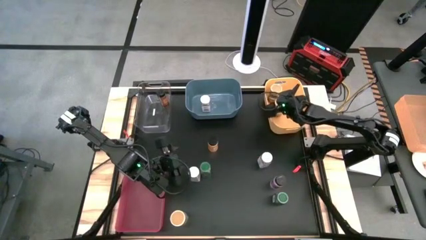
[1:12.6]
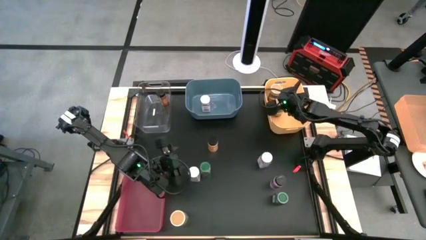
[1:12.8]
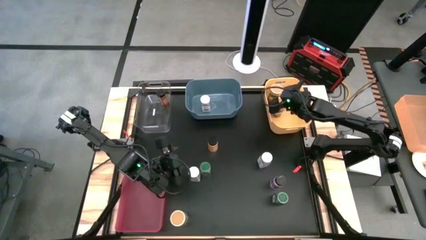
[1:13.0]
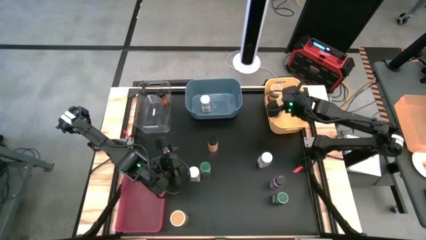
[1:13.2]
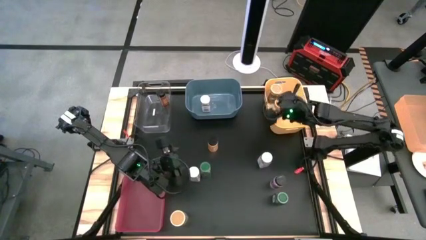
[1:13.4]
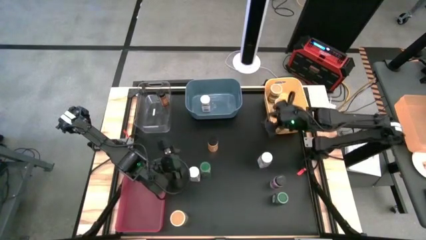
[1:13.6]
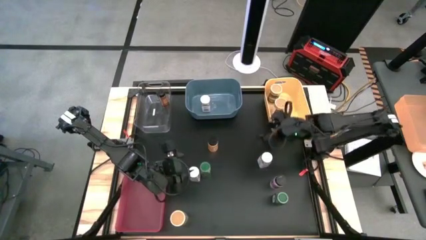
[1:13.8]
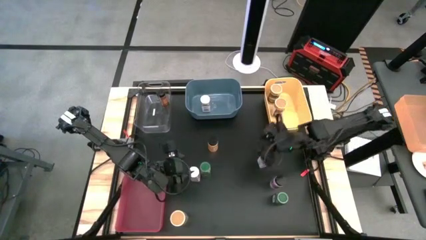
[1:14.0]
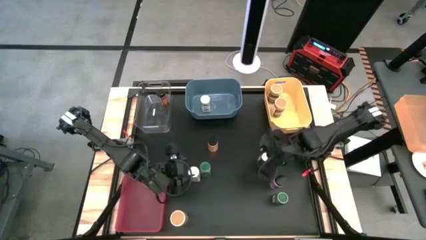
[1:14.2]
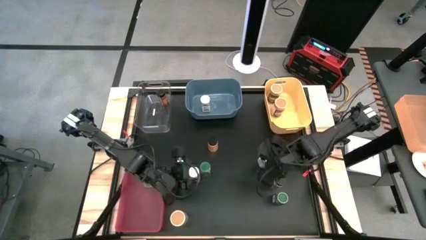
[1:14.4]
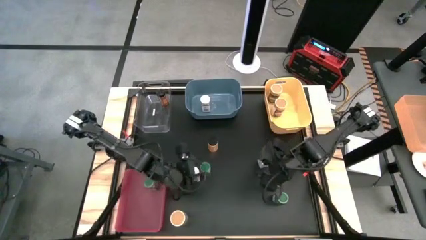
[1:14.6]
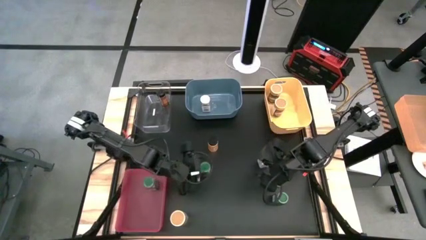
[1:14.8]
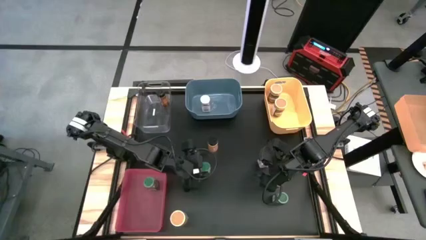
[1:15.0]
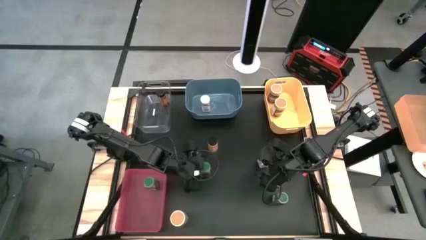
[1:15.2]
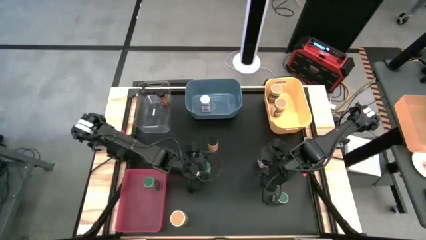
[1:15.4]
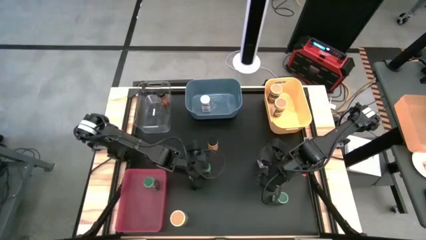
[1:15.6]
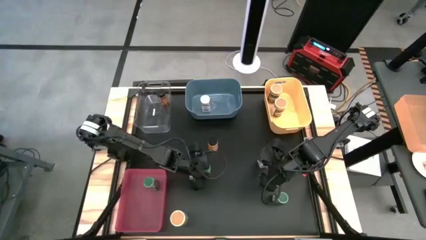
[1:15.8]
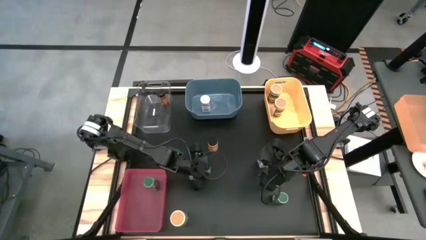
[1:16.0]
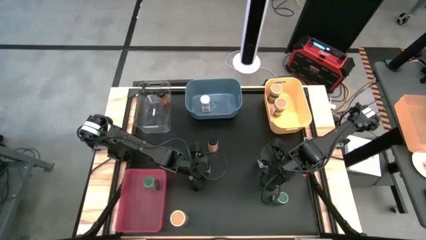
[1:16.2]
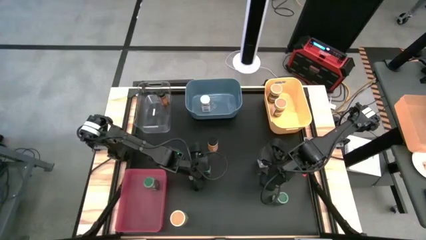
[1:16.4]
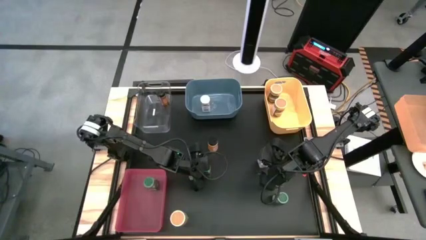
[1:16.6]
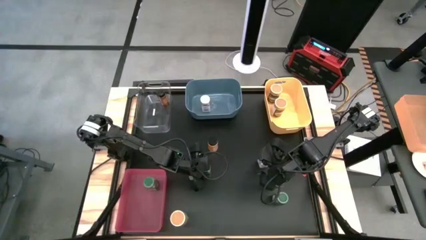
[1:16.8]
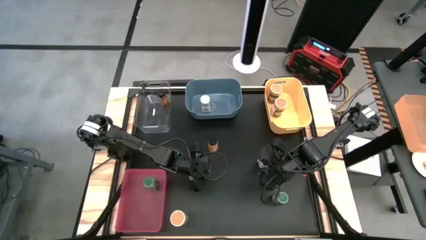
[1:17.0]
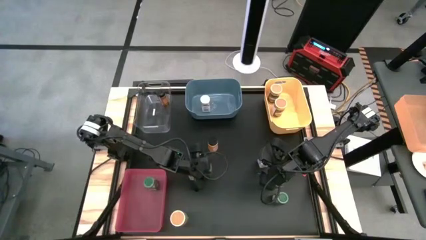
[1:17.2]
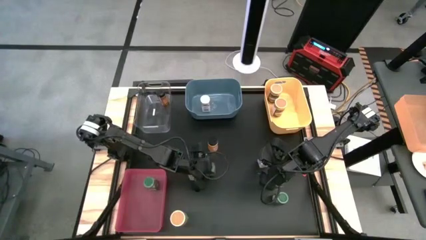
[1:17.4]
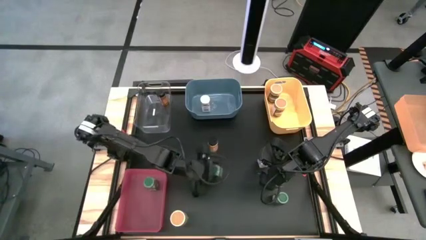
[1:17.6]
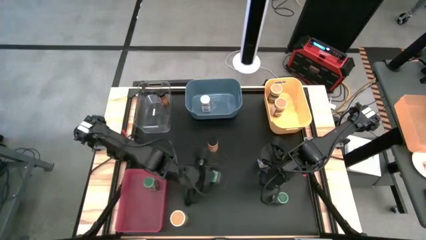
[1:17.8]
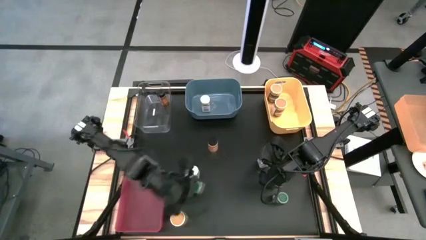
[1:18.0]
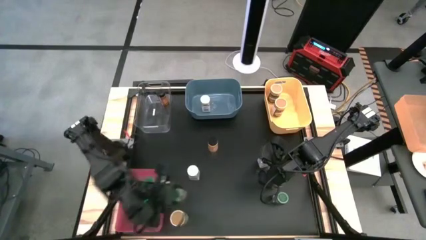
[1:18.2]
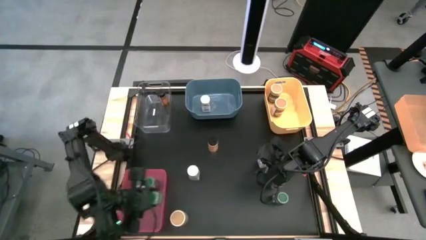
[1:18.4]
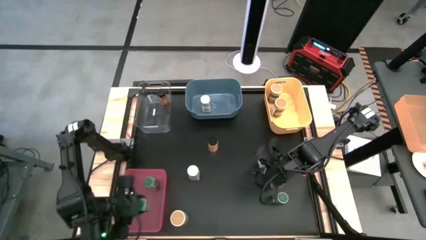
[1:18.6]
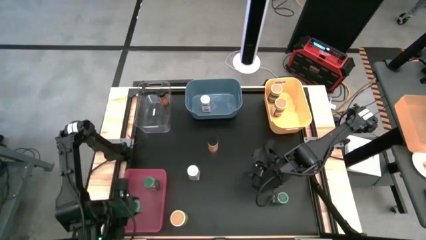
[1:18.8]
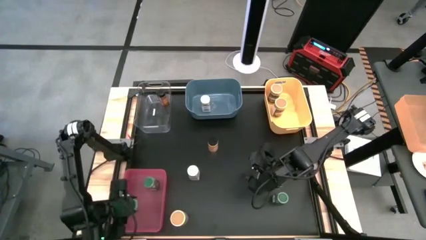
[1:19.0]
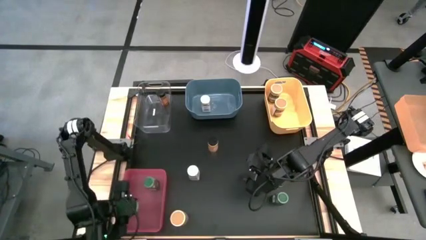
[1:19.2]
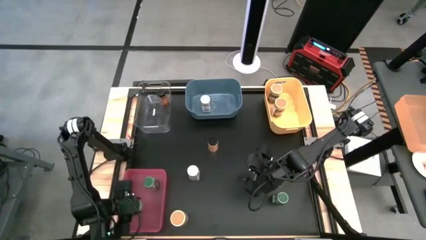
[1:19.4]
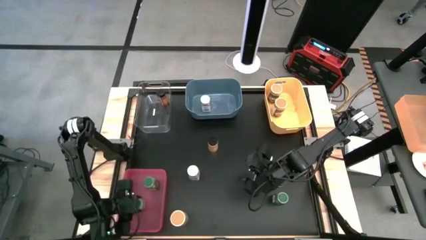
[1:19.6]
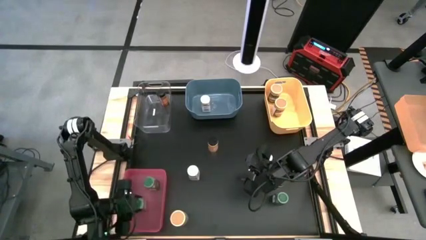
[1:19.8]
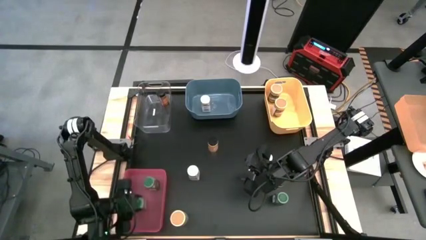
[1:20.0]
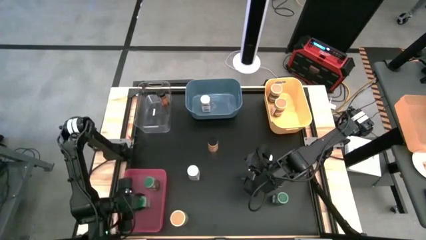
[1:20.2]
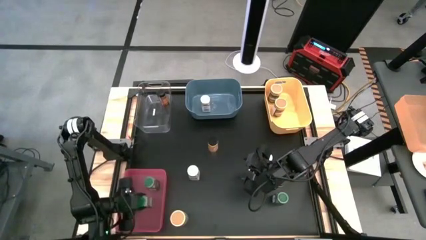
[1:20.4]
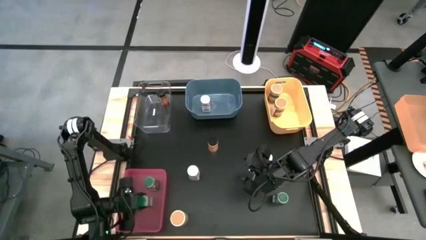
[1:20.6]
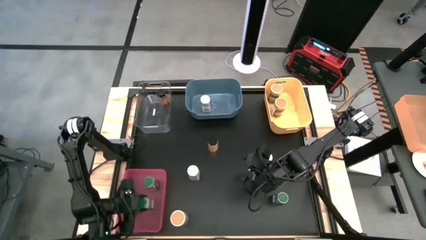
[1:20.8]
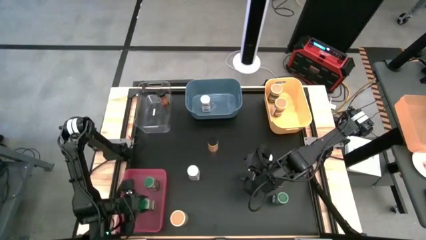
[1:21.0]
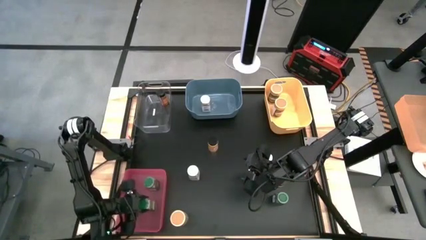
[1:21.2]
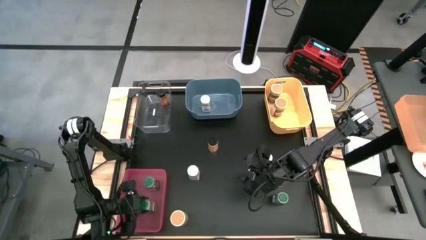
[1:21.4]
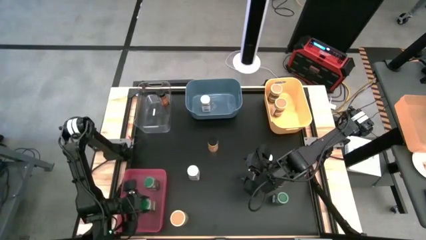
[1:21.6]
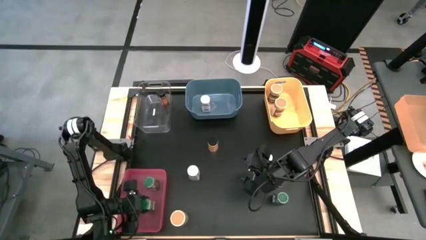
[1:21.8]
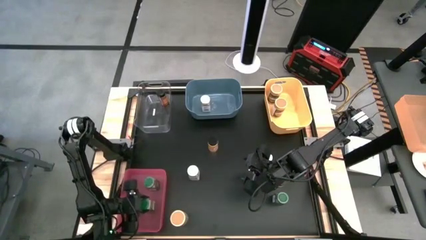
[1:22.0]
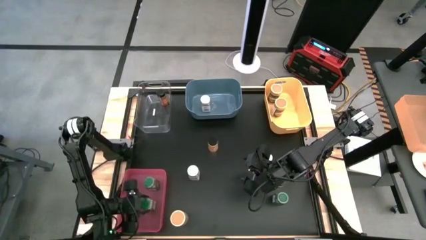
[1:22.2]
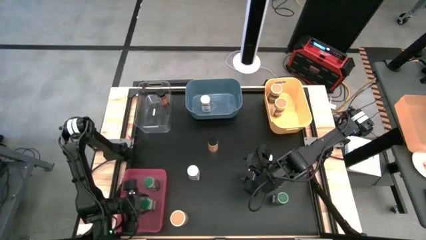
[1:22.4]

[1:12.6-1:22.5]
Task: Sort spices by type
Put the top green seasoning bottle into the pink bin

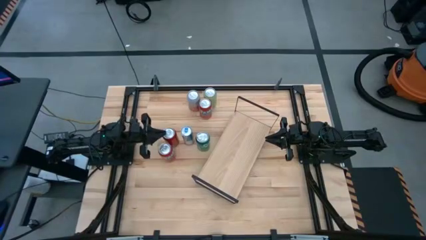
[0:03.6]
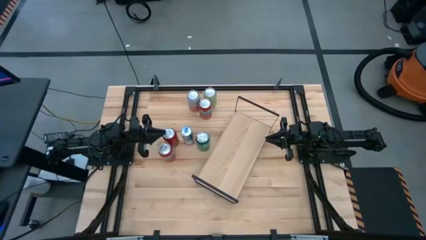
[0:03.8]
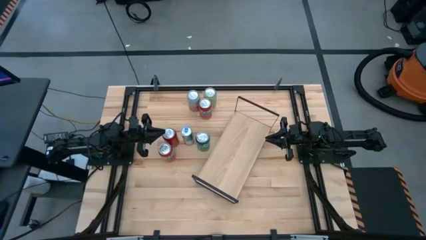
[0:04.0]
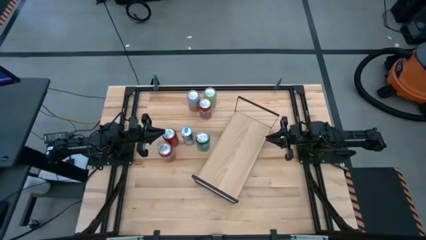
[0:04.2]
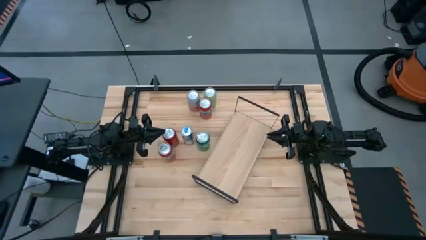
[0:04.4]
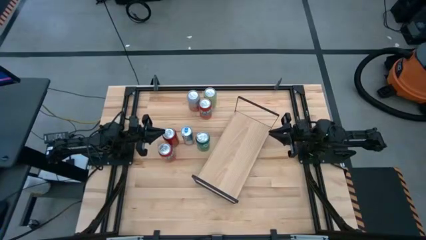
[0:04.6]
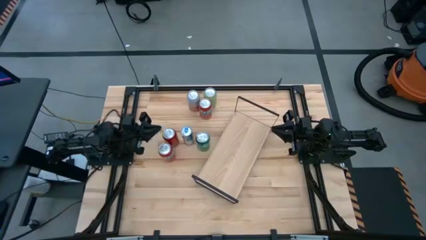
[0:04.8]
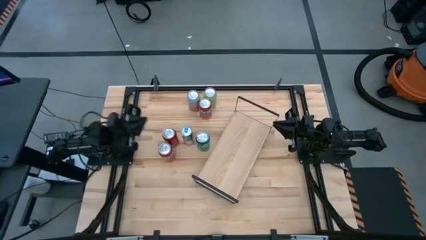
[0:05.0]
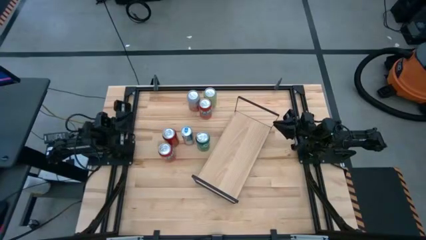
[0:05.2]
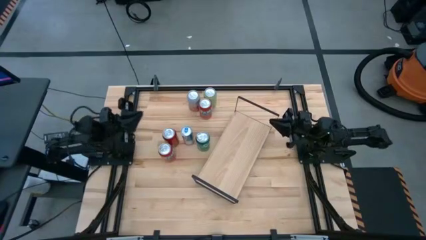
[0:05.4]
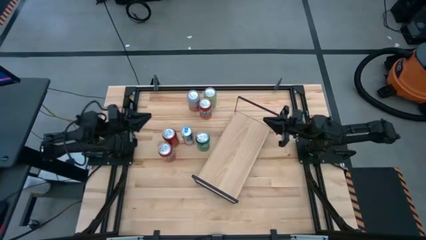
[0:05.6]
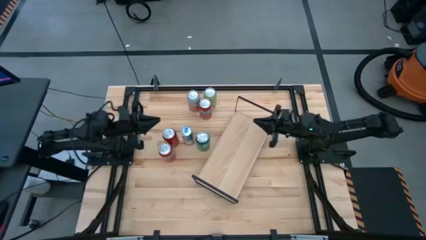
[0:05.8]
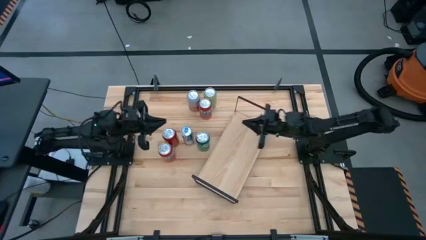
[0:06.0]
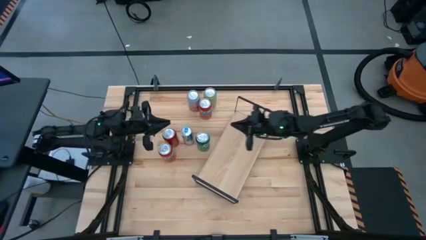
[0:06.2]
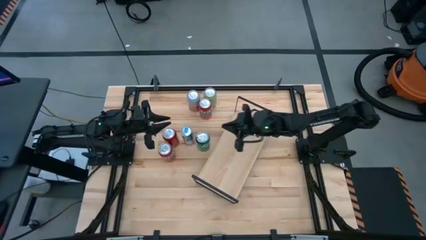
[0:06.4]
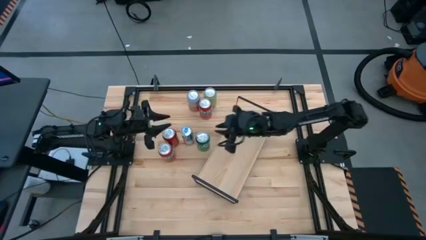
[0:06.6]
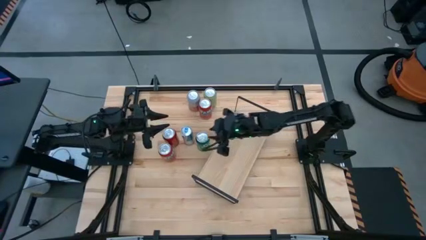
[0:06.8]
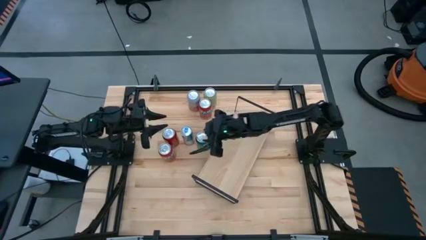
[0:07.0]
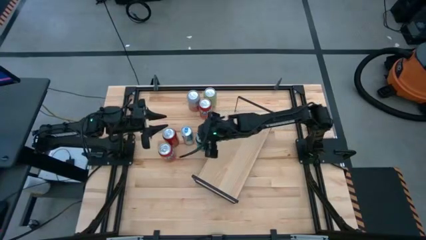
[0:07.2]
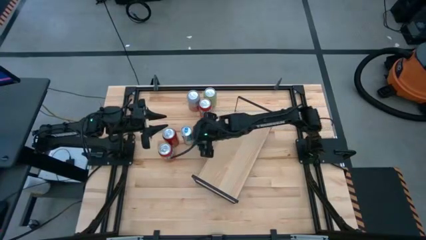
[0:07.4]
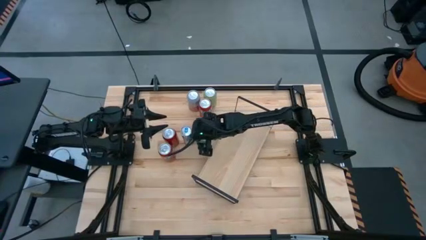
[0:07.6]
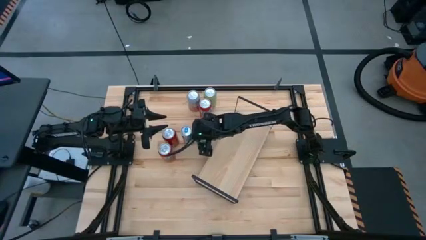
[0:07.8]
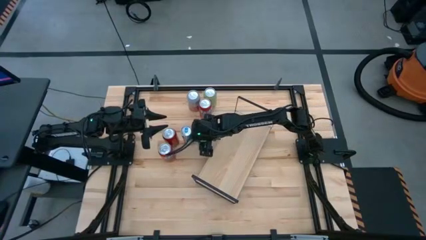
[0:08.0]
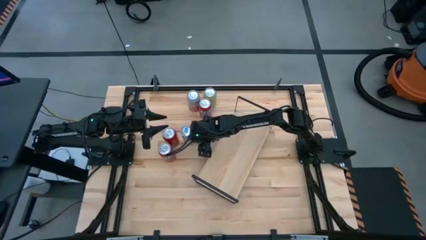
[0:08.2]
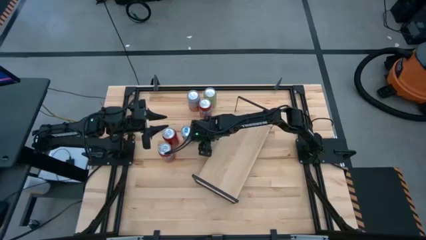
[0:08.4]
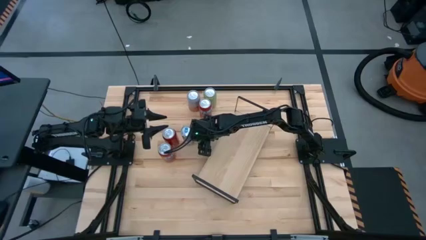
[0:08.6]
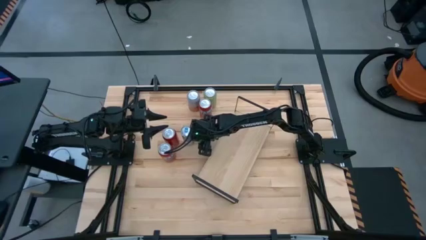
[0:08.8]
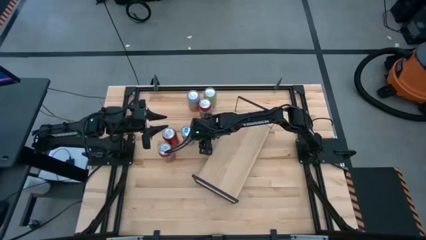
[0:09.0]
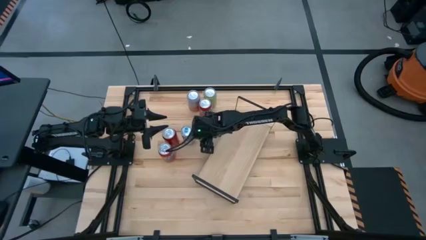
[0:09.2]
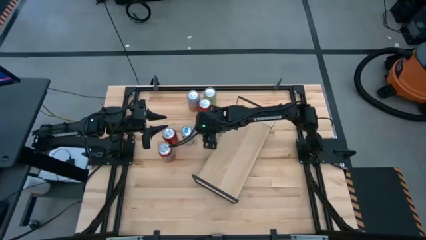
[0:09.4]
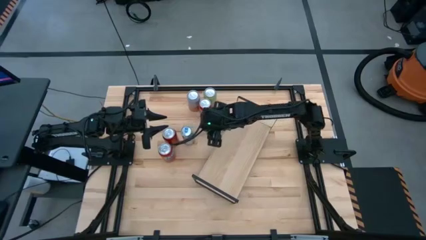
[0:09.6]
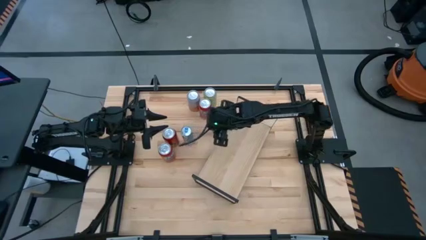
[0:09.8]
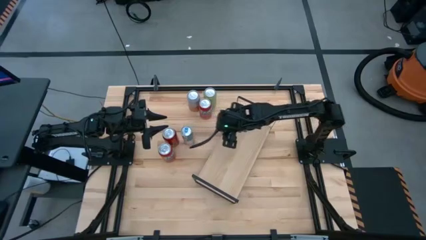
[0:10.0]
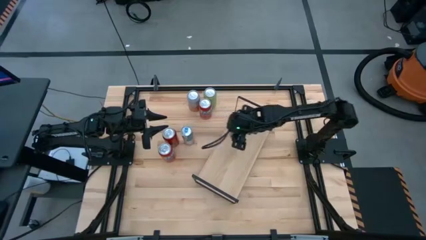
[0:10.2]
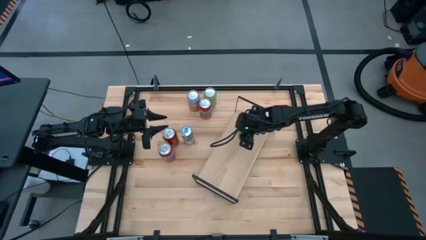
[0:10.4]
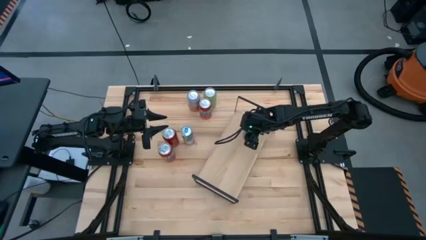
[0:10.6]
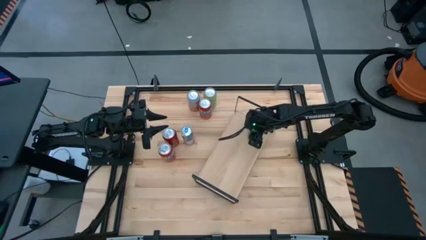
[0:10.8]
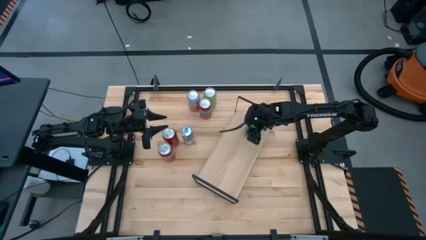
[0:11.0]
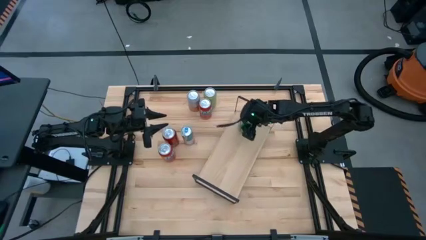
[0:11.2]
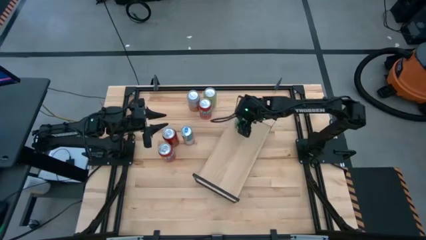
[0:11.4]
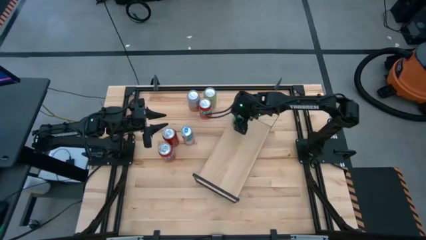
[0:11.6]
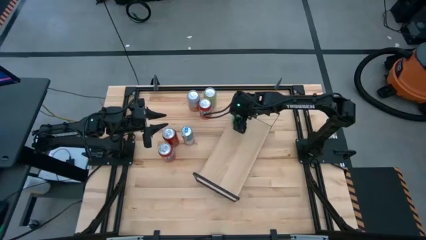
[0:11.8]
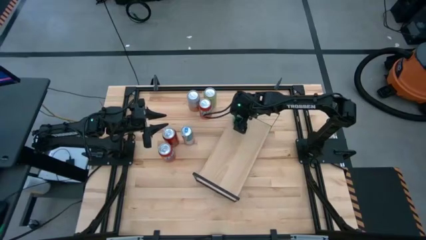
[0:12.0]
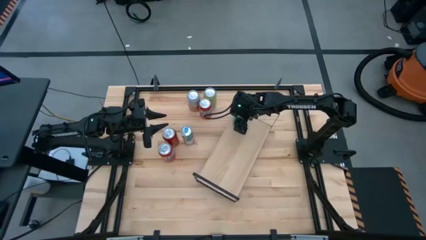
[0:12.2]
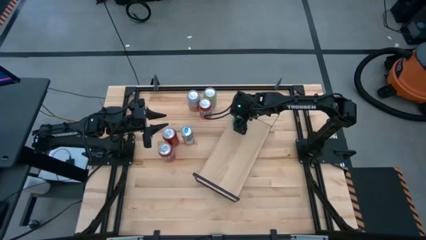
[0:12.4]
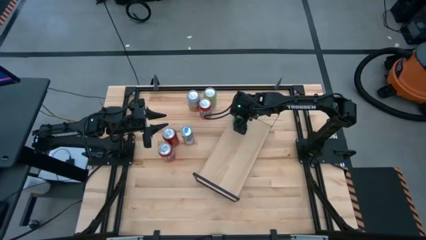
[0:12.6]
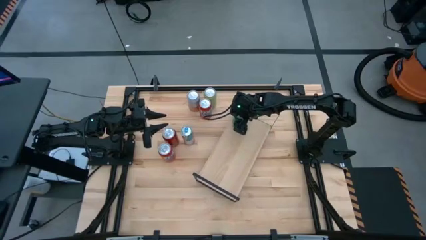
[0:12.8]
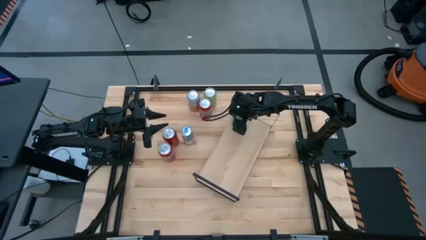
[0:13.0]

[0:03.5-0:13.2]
Task: Place canned beverage on shelf
Put the dark green soda can on the shelf
